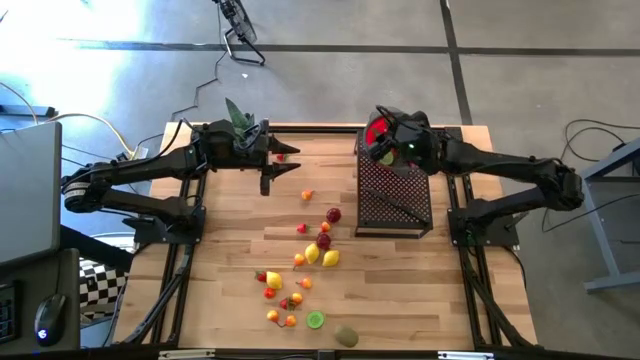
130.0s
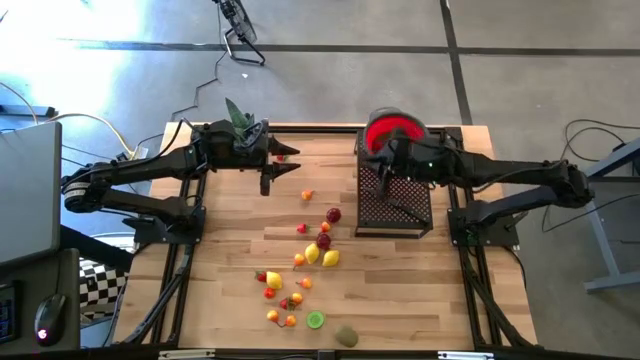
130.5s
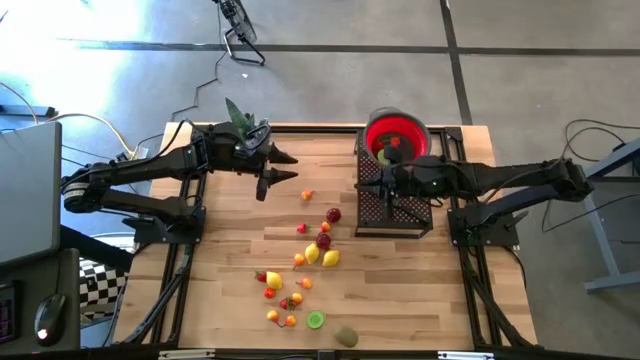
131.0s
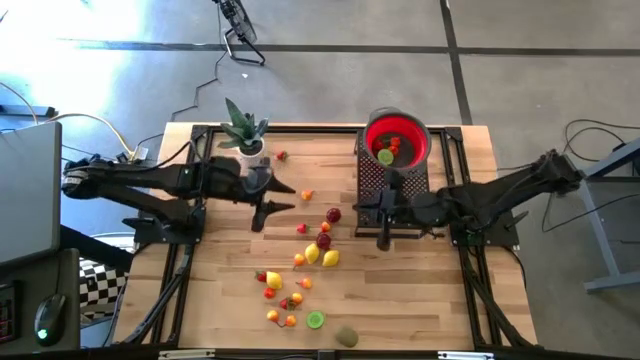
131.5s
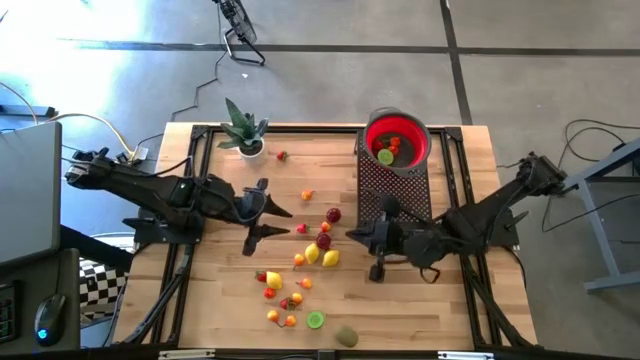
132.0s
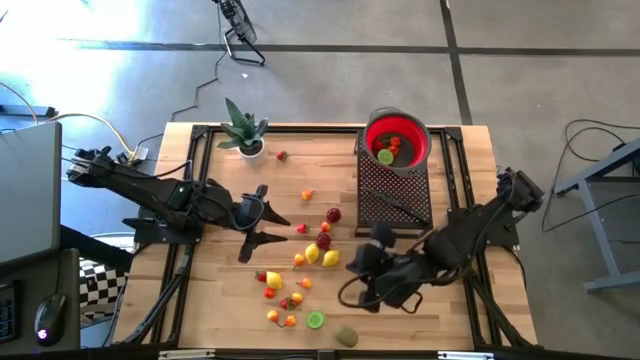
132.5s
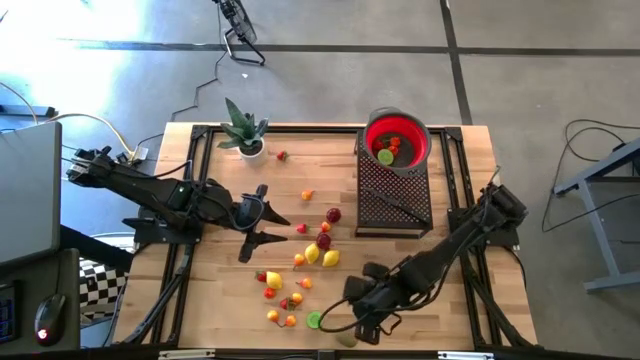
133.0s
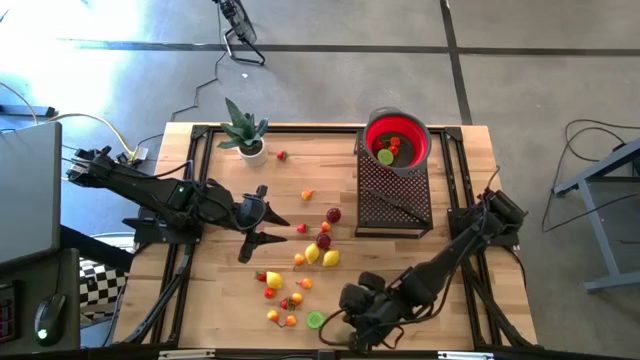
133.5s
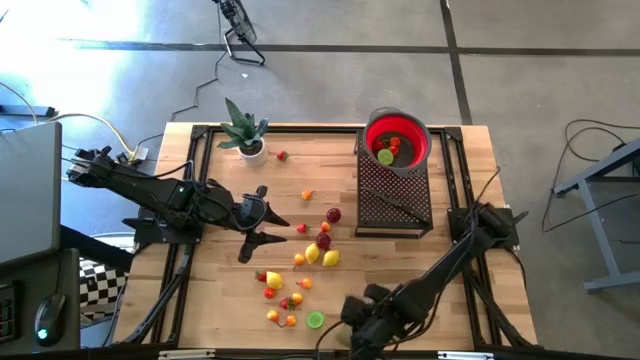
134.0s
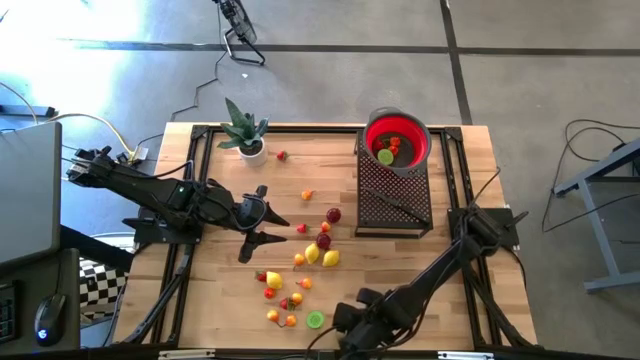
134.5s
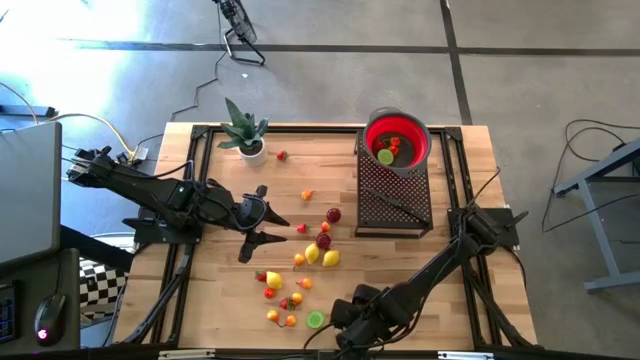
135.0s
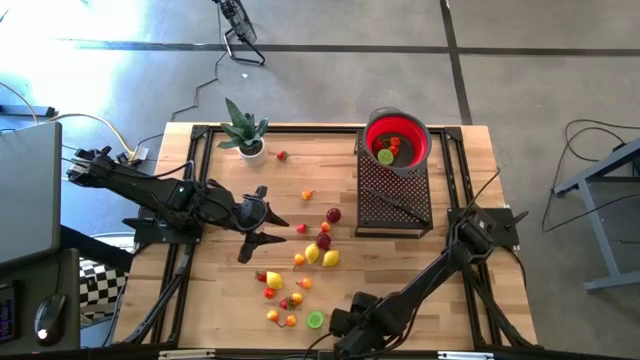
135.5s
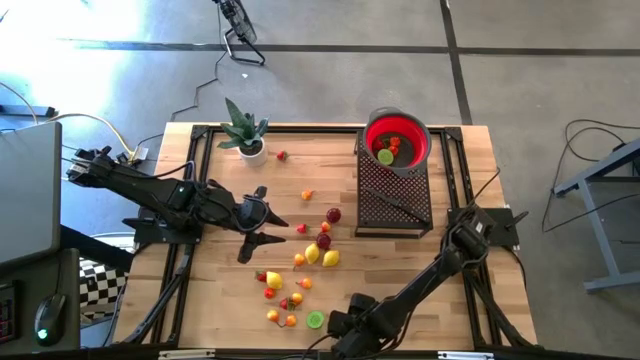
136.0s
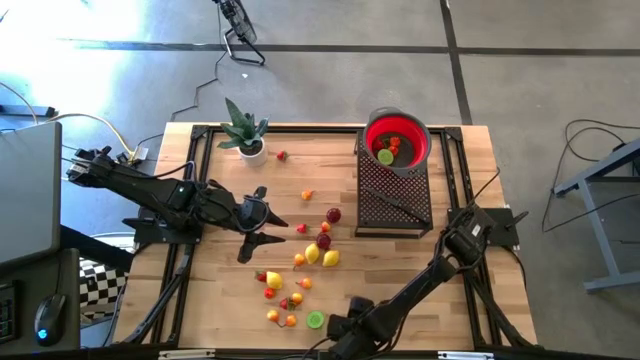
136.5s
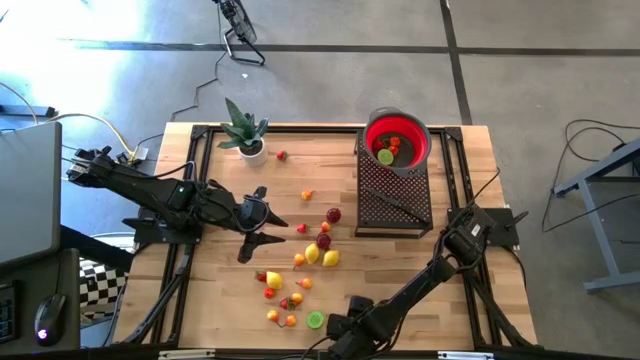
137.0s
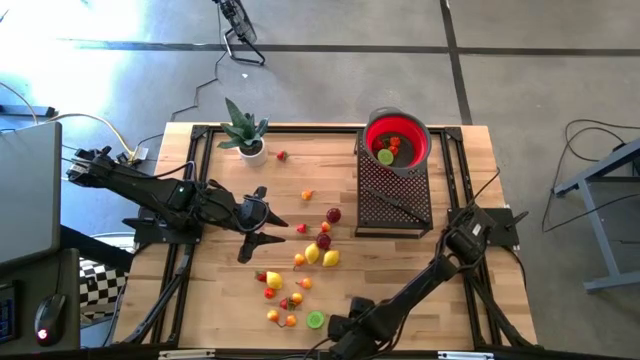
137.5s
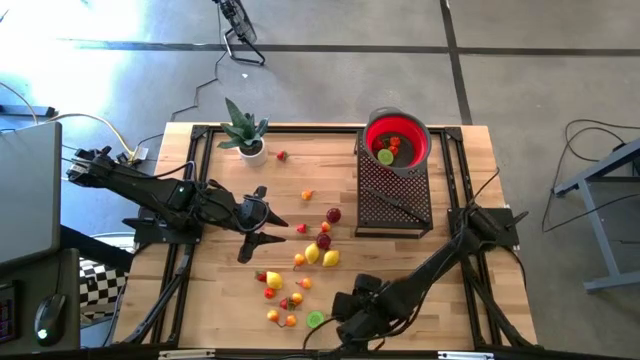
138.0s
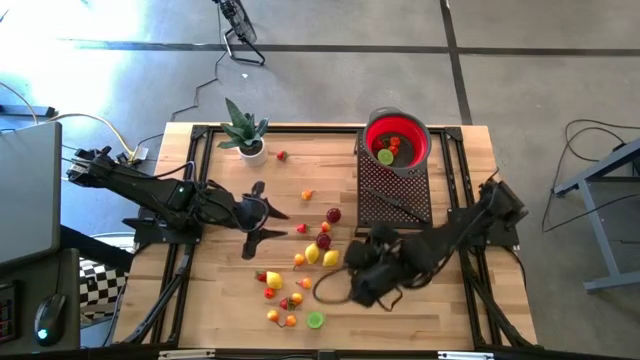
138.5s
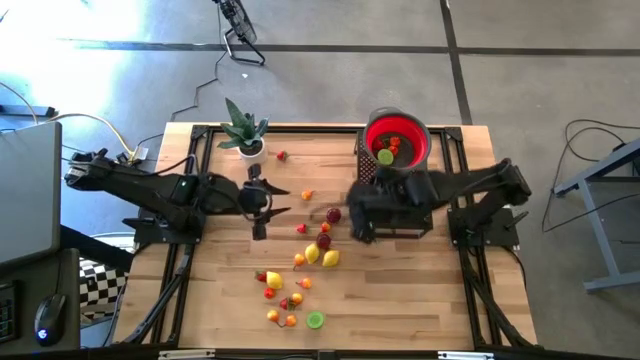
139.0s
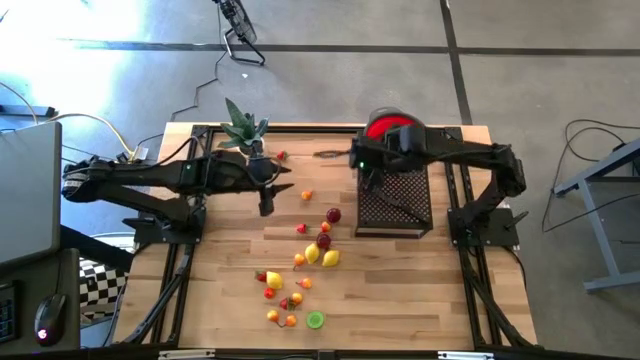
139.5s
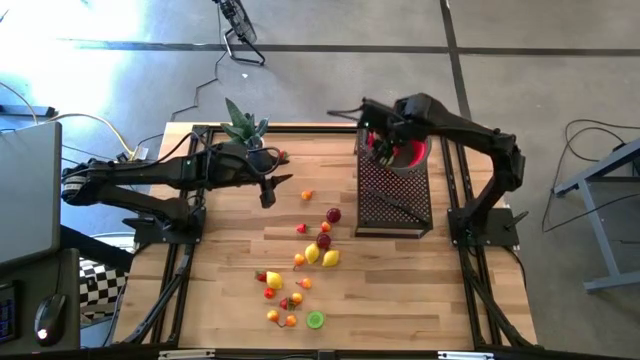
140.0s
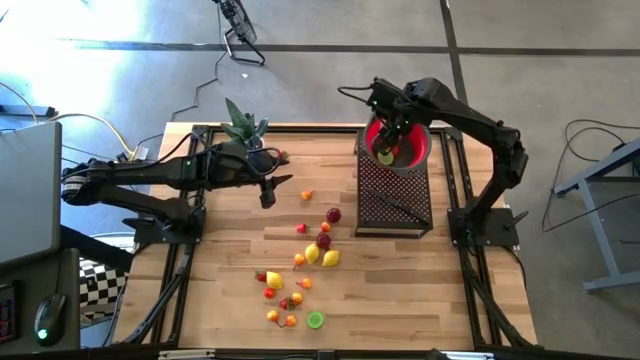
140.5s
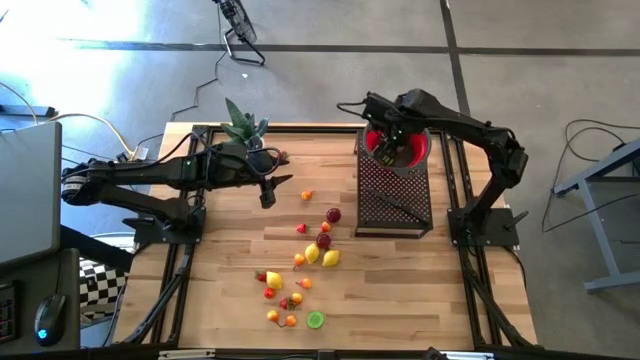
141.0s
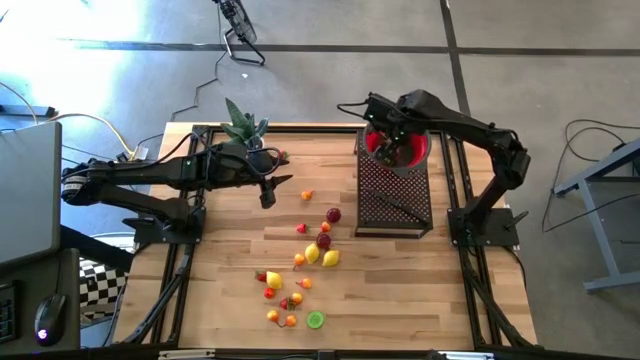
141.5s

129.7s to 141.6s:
Task: Pick & Place Fruit
Put the kiwi into the strainer bowl on the shelf

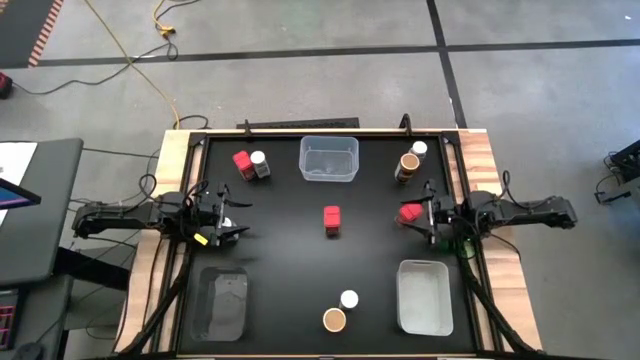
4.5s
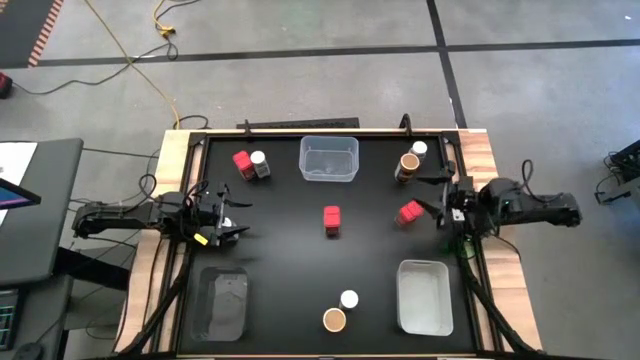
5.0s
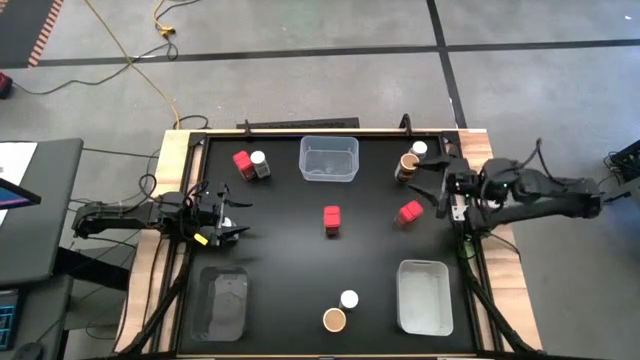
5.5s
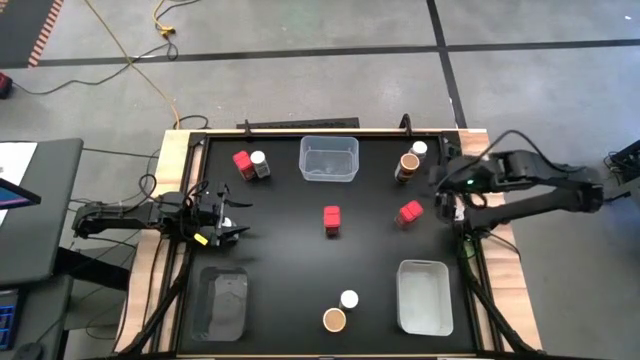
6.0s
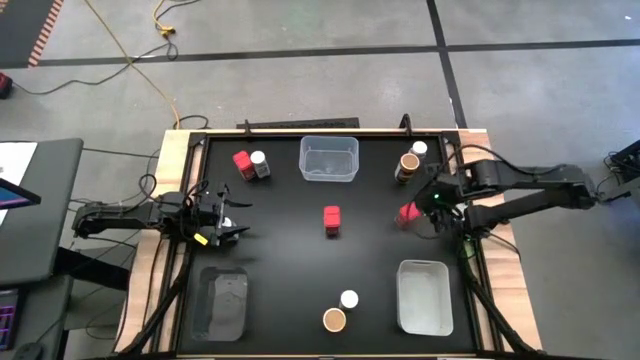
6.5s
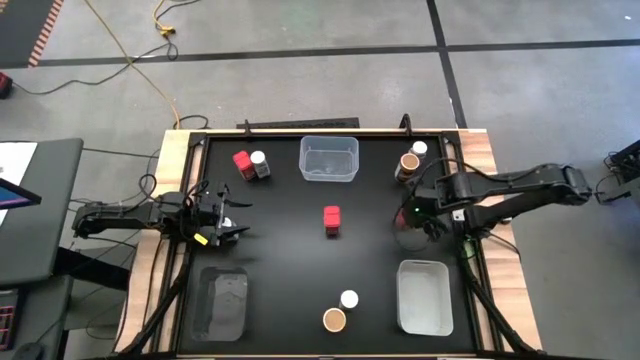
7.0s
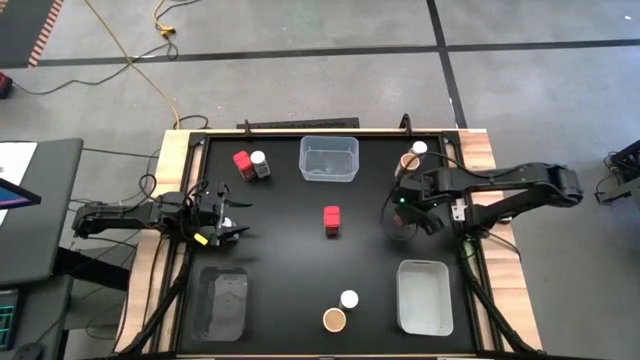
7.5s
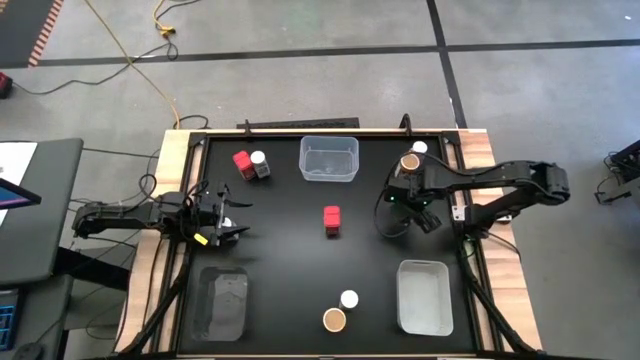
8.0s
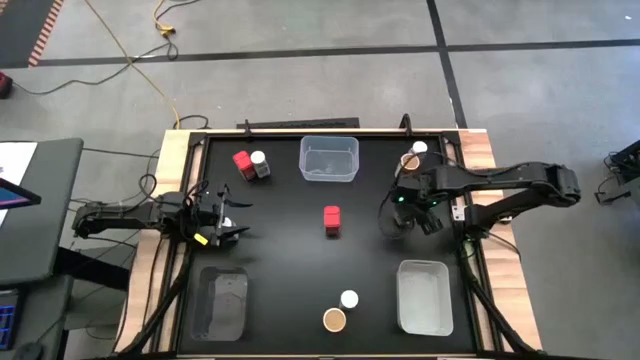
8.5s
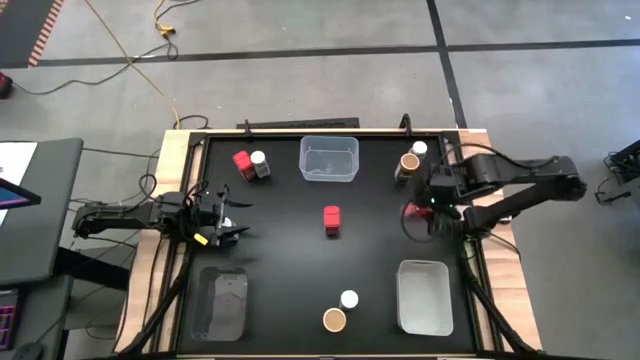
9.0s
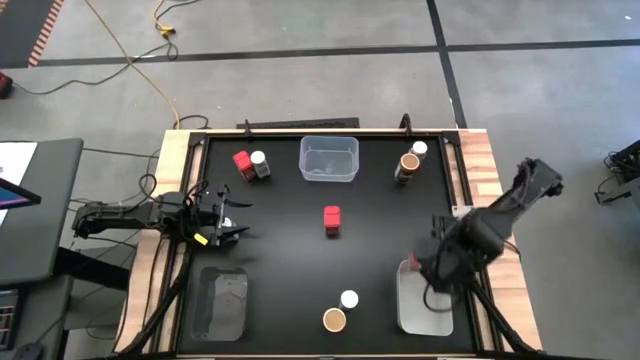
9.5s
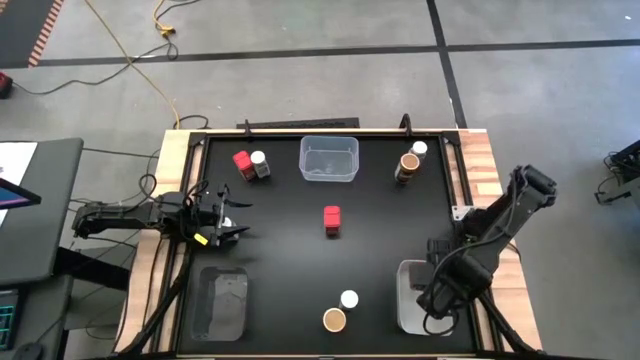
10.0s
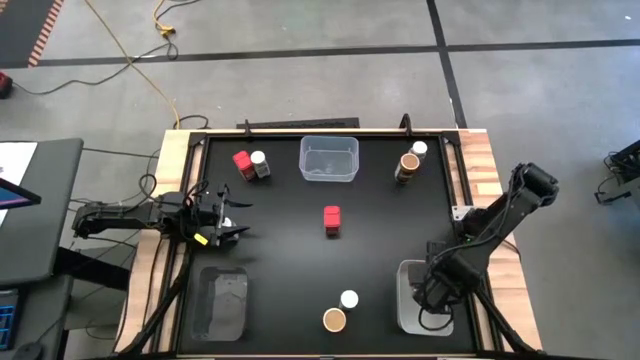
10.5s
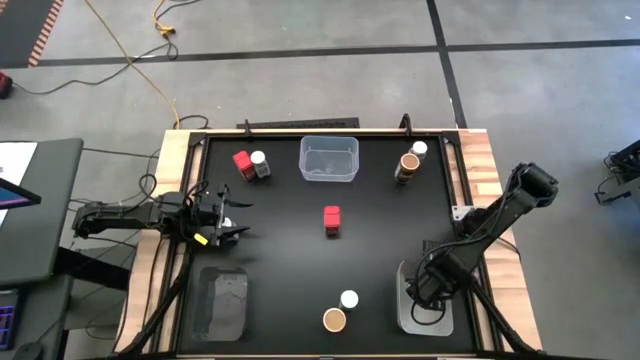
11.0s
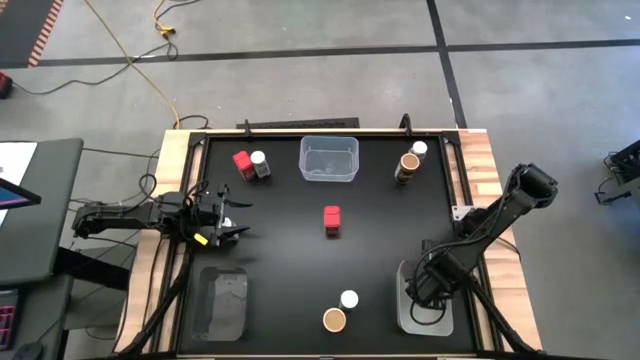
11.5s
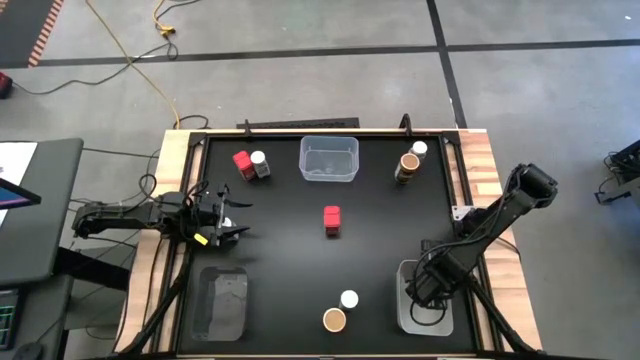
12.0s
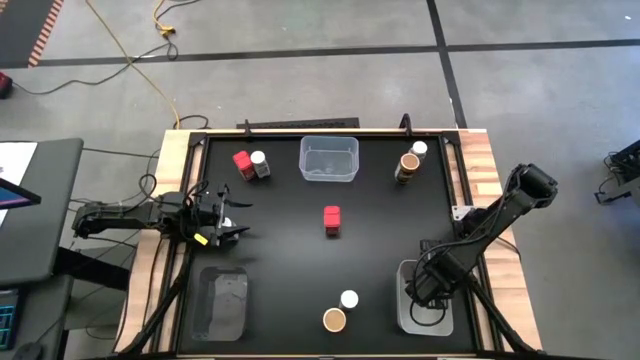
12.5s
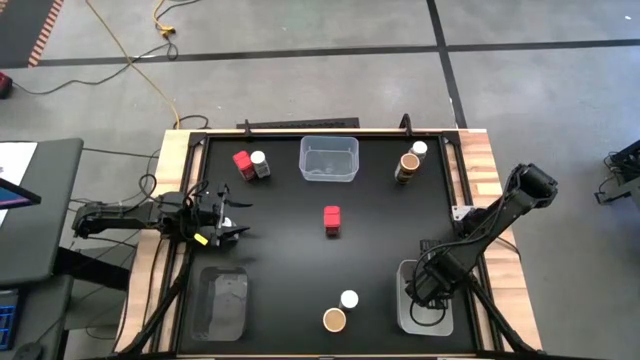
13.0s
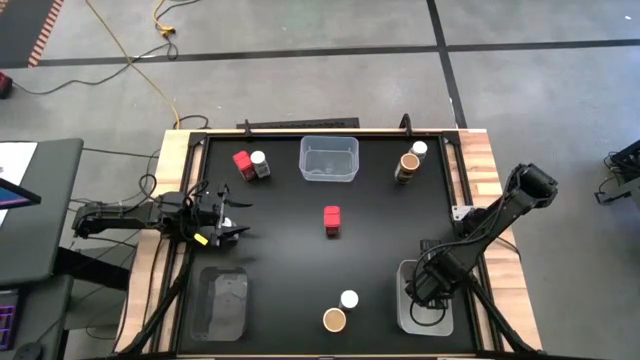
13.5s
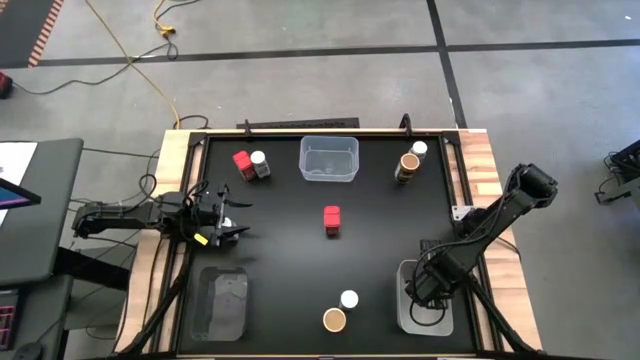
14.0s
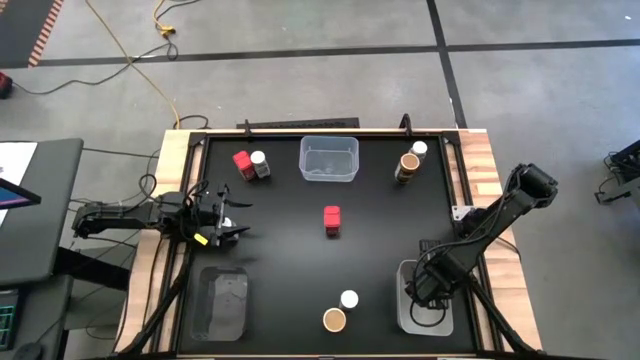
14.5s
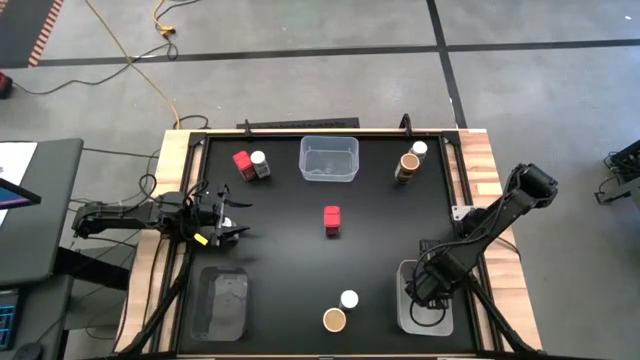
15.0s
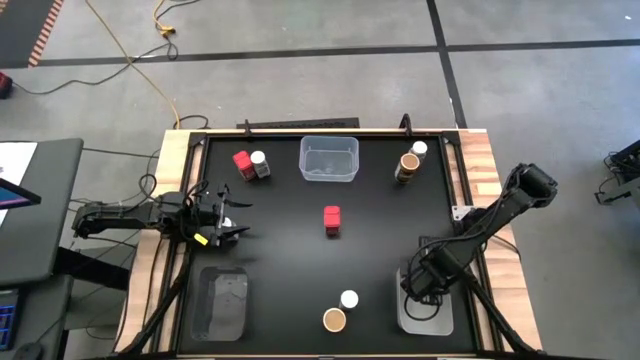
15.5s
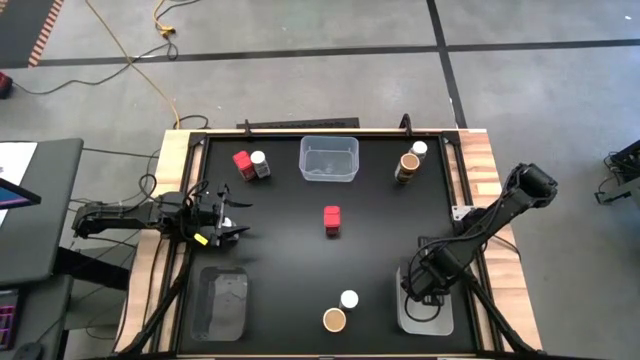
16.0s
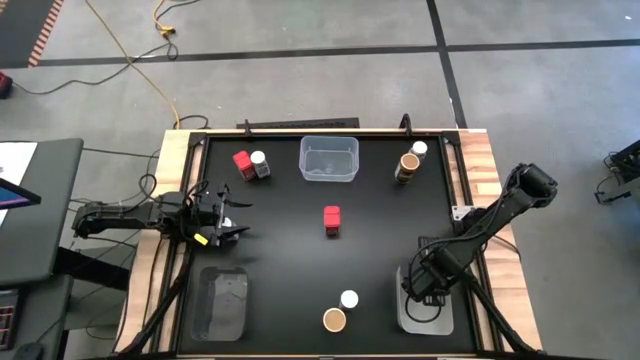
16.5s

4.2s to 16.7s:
Task: Sort spices by type
Put the right red spice can into the white bin
